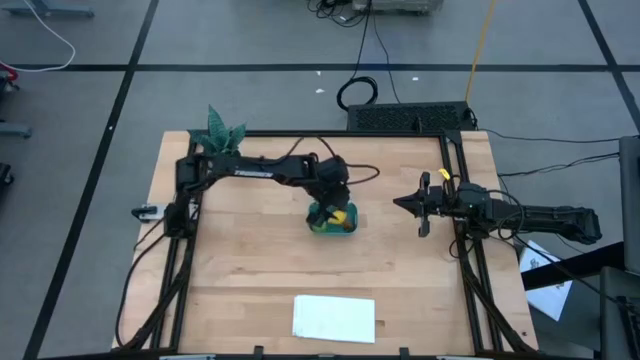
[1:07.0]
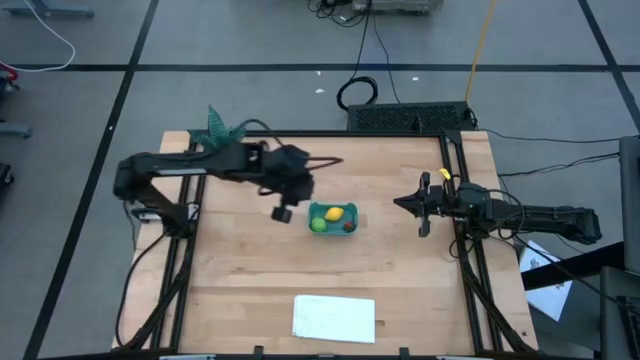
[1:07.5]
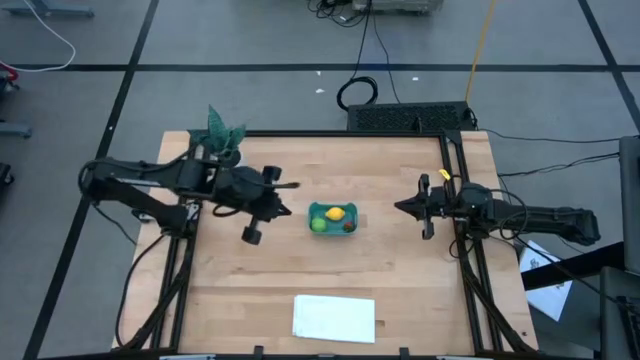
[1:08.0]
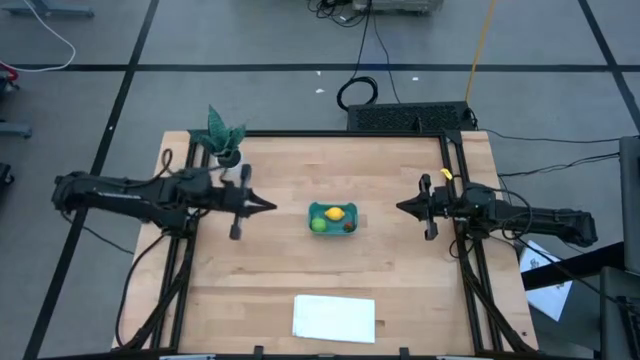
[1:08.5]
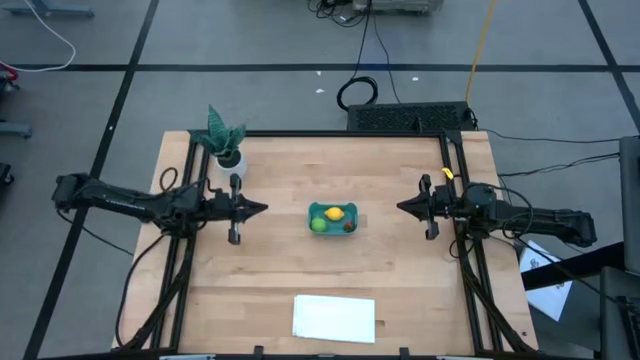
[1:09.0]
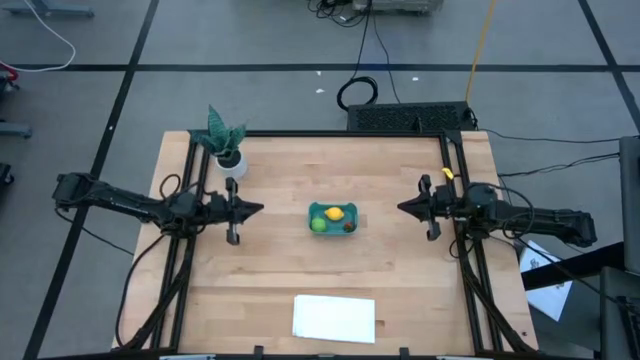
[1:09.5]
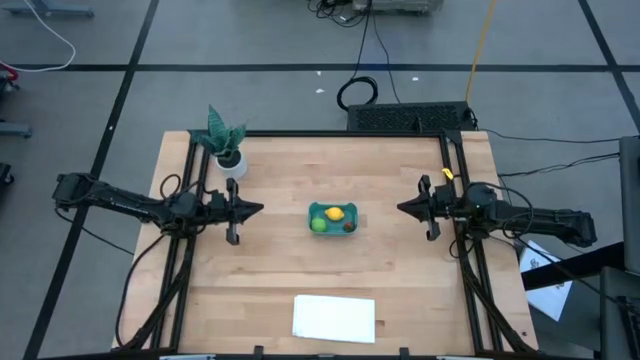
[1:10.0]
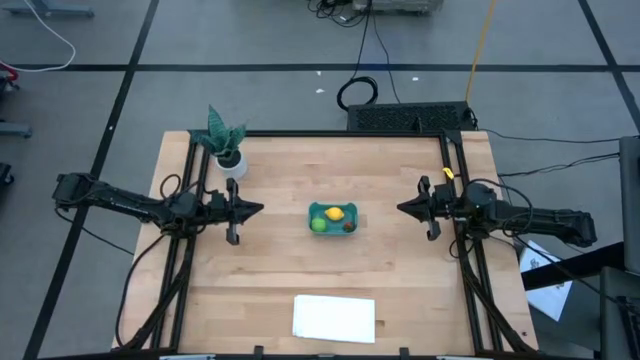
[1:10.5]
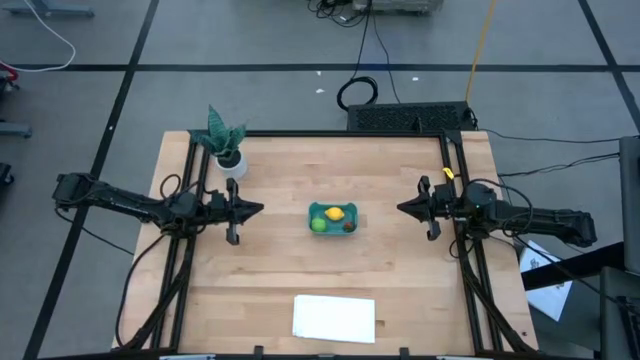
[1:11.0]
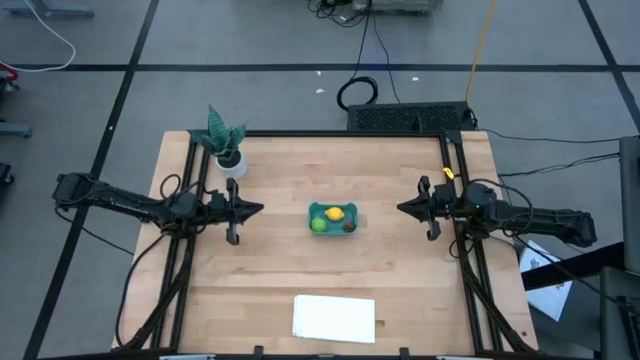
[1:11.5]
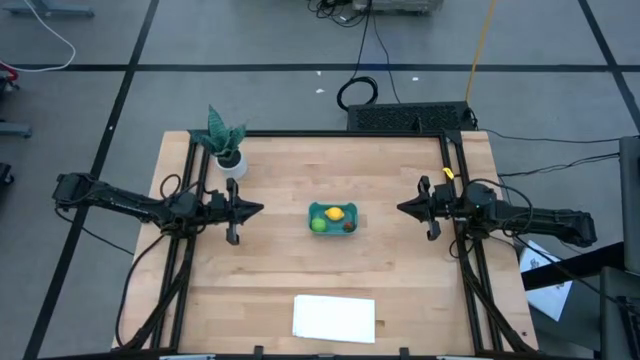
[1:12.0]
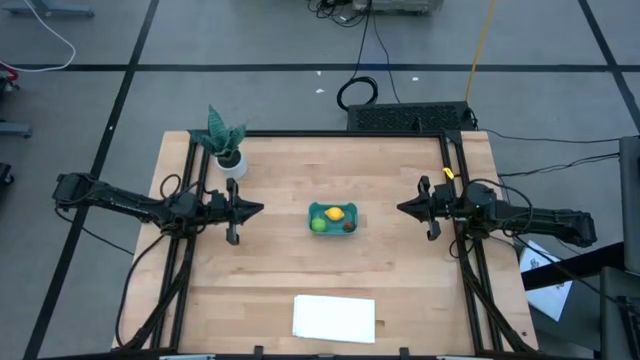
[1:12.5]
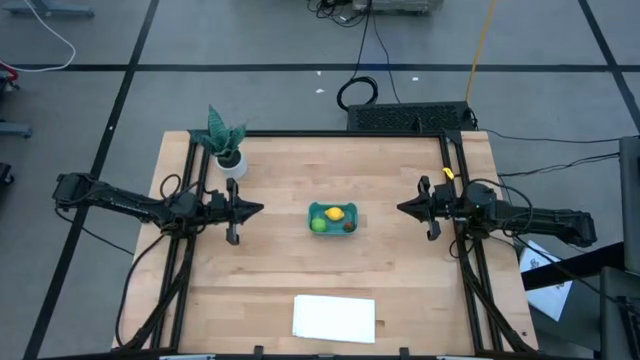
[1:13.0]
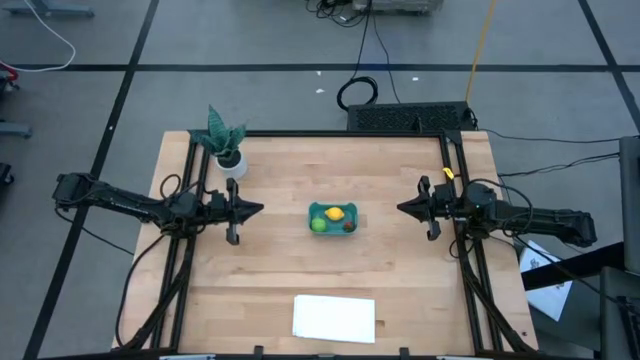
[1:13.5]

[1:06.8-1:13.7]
Task: Pick and placing Produce into tupperware
Return to Home Position

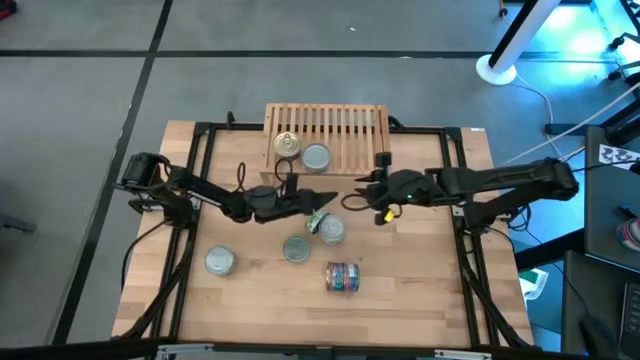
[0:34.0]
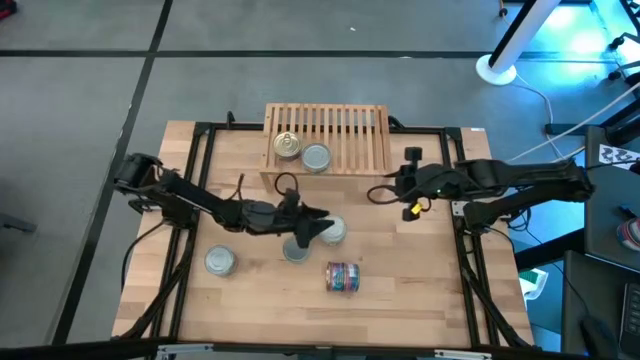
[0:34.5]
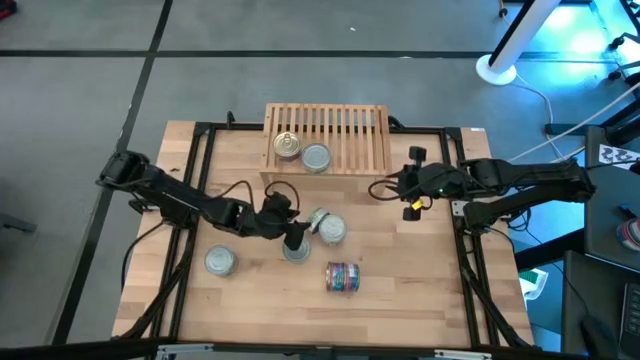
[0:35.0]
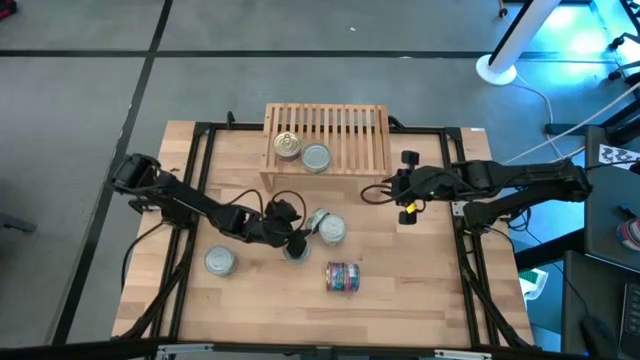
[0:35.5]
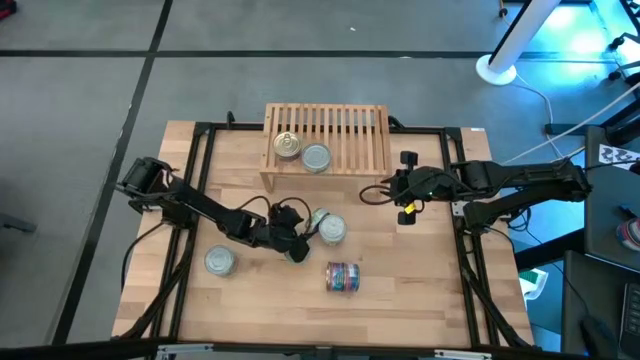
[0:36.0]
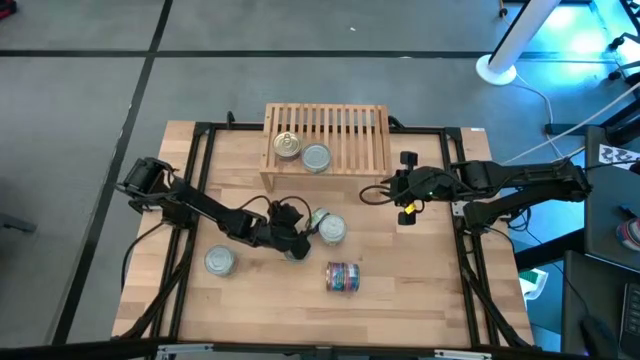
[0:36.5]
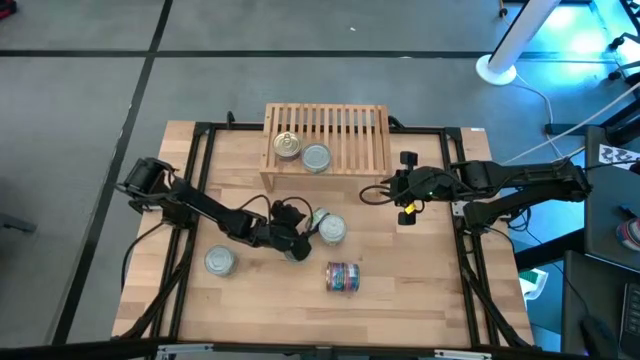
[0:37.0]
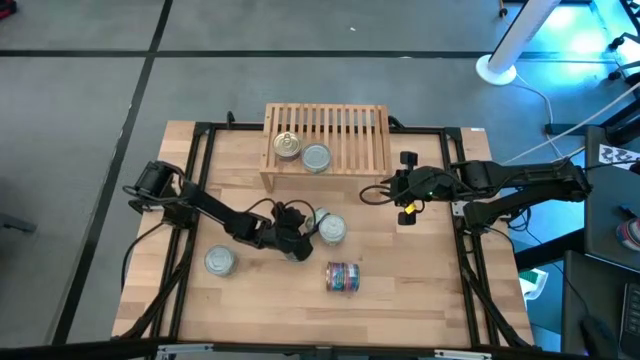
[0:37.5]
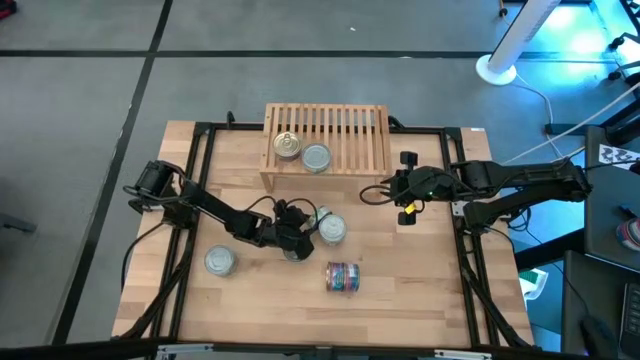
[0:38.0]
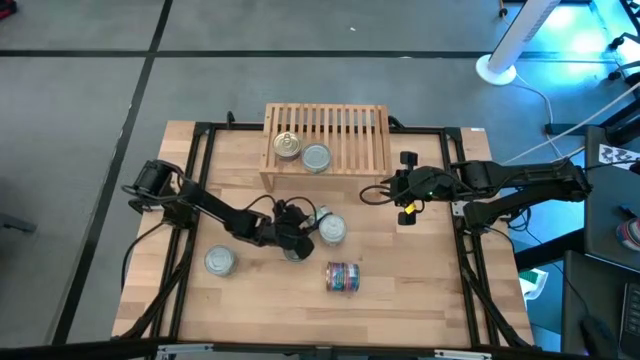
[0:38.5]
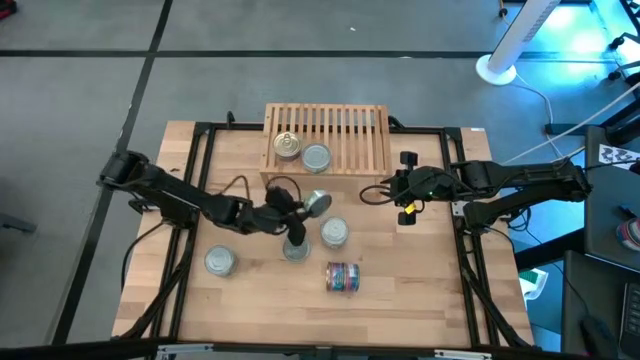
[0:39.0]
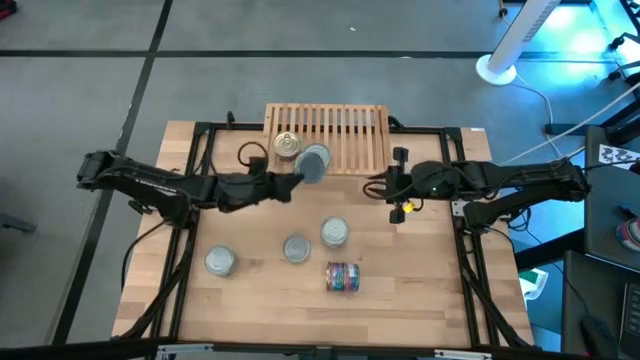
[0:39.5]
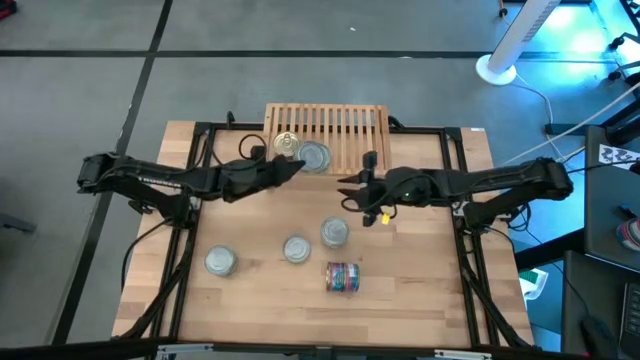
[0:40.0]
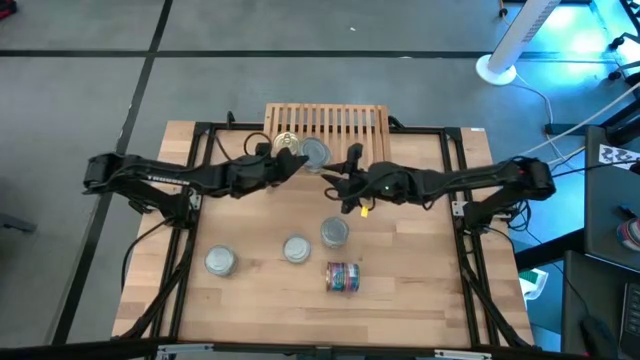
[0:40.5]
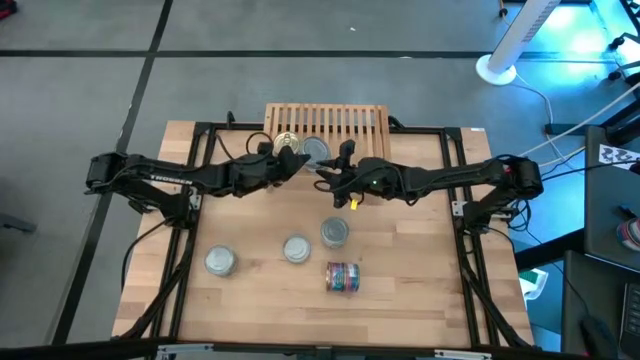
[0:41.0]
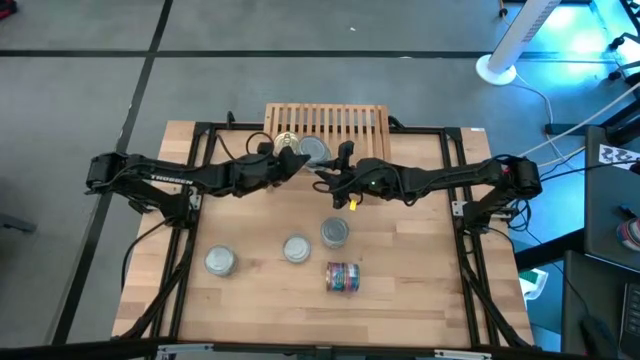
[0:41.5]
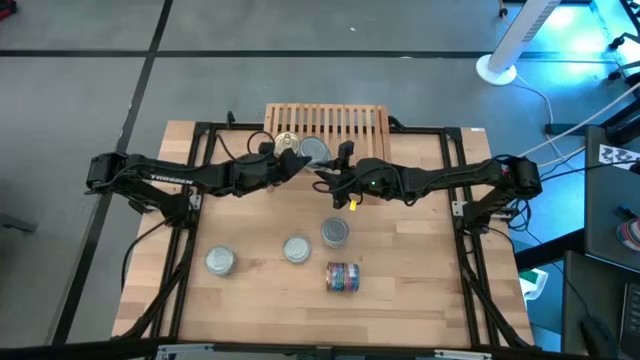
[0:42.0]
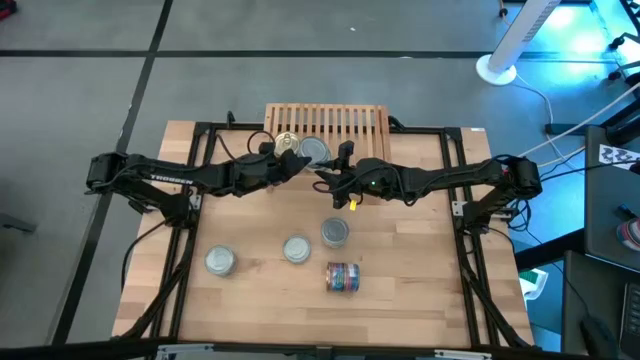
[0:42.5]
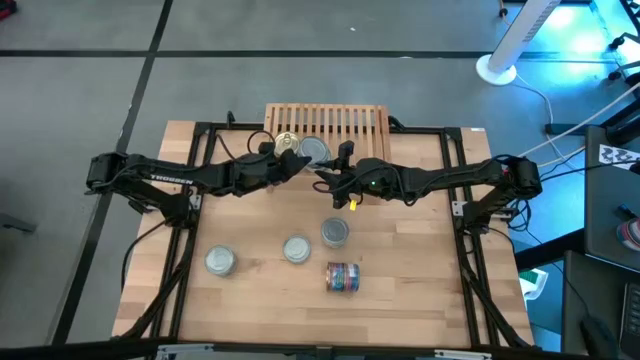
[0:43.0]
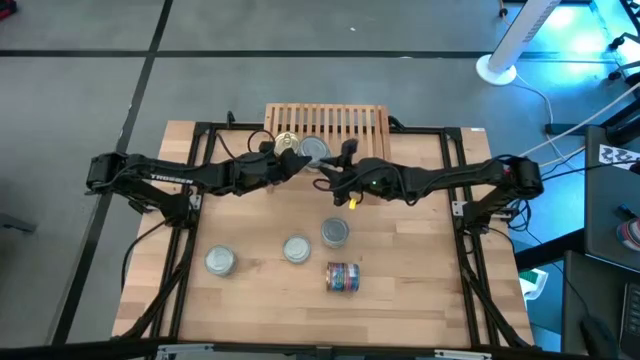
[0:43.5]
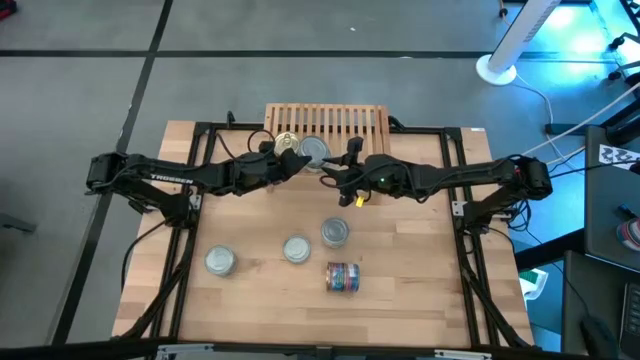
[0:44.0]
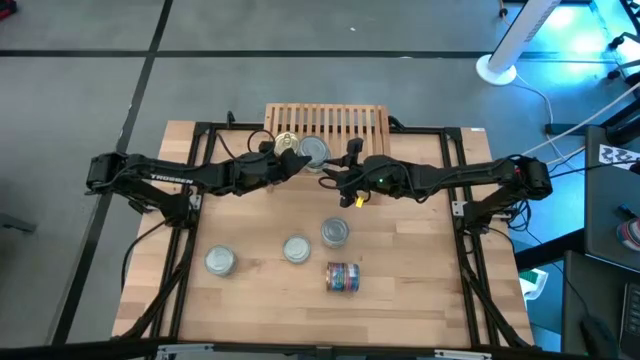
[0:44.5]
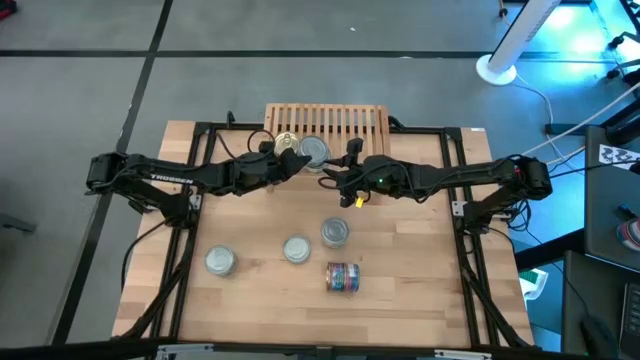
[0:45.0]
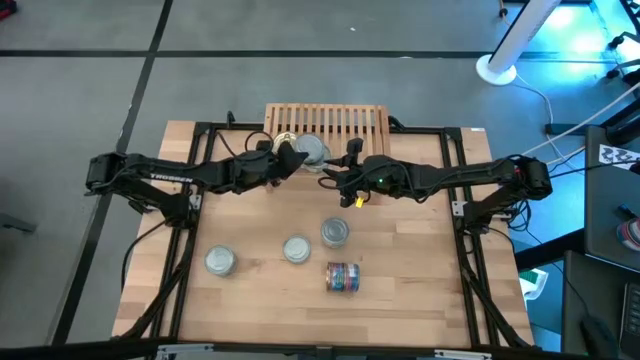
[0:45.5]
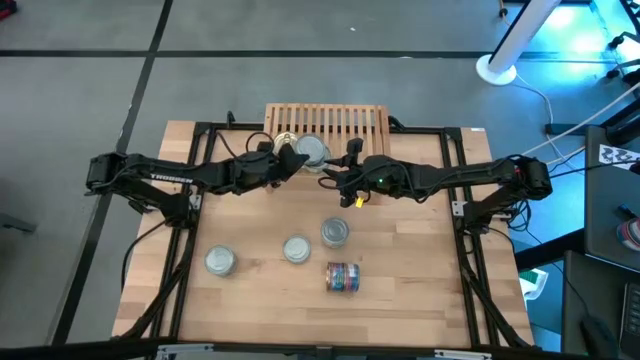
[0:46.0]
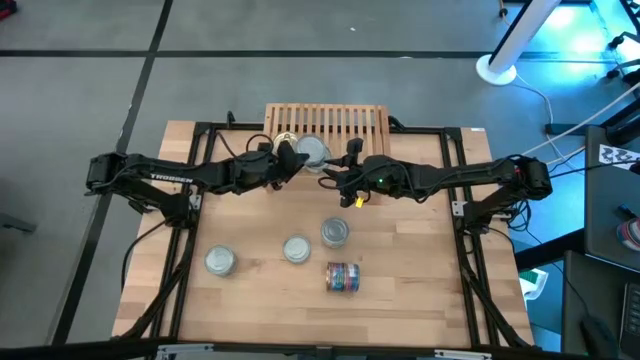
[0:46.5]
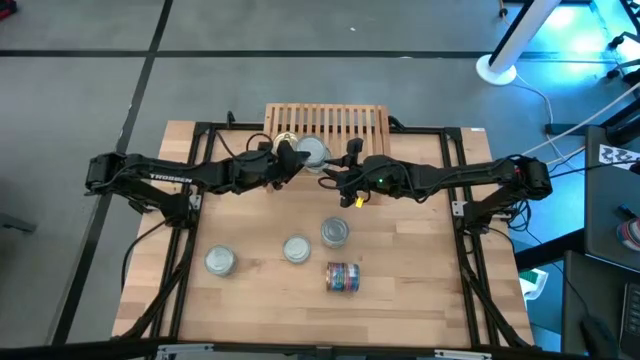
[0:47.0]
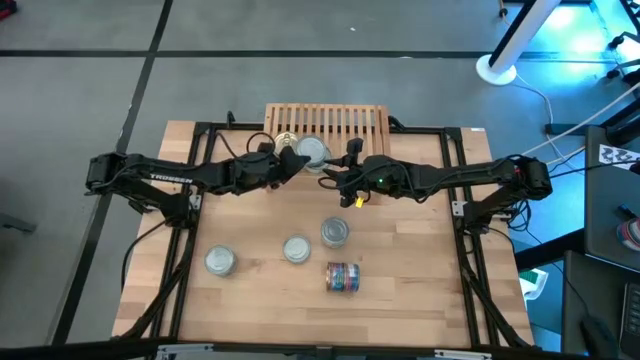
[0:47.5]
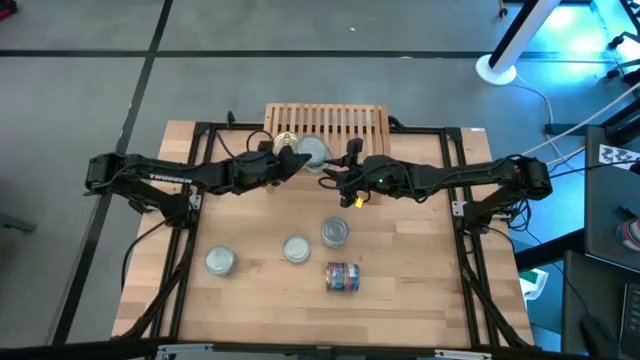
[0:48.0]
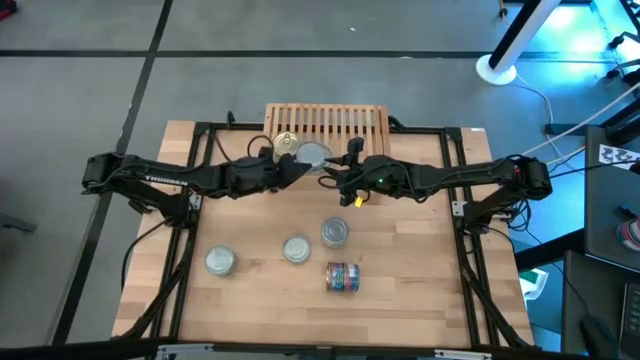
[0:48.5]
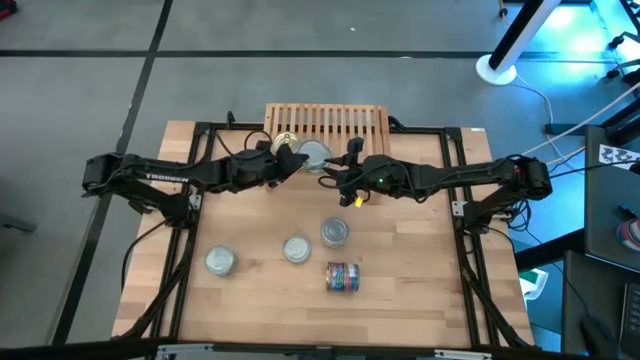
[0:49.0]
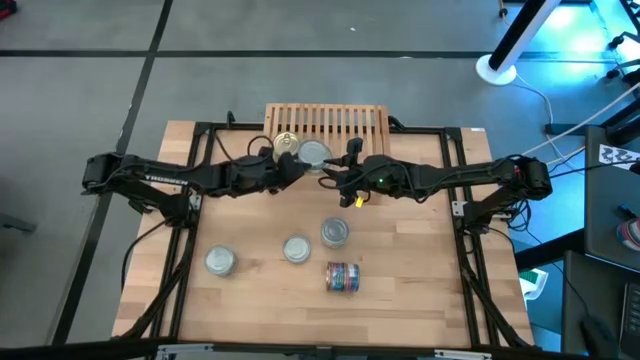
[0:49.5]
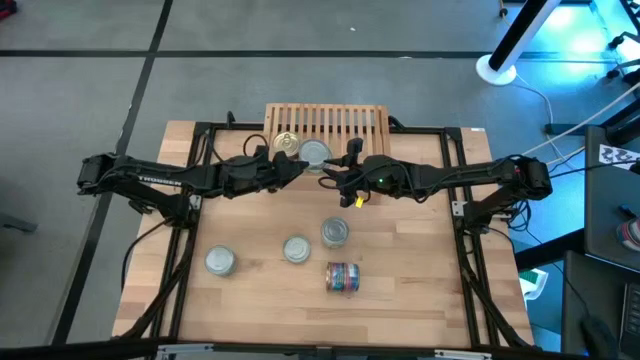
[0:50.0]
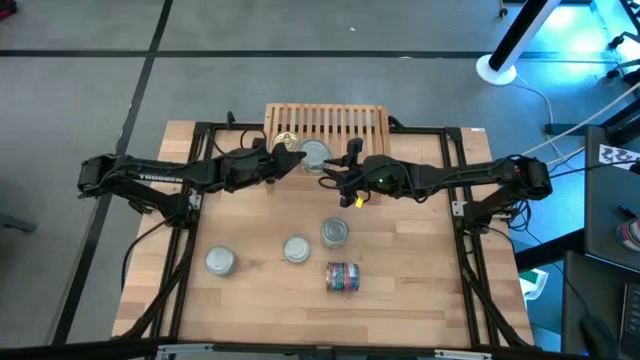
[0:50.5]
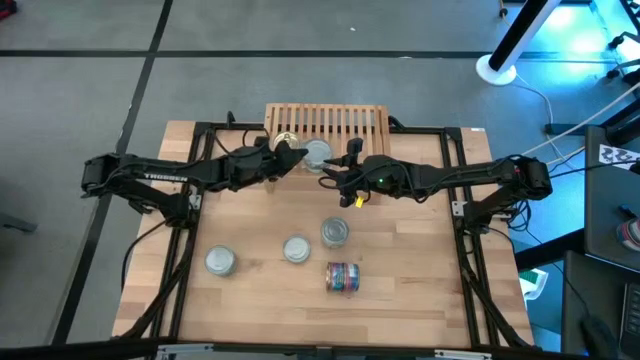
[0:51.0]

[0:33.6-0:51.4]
Task: Stack canned seafood by type on shelf
Stack the green tuna can on top of the other green tuna can on the shelf
